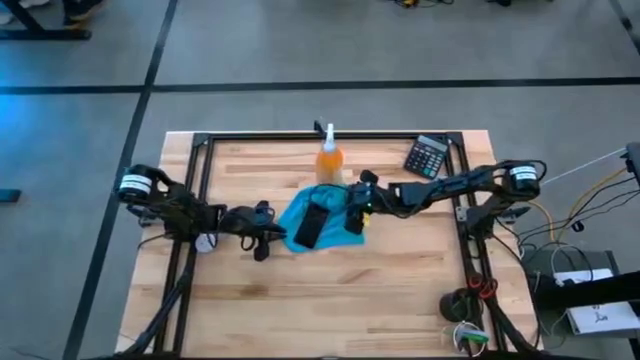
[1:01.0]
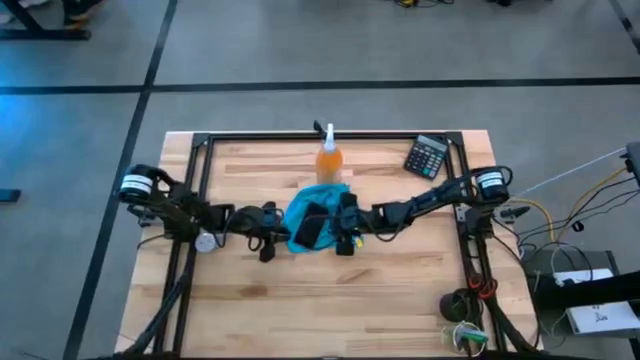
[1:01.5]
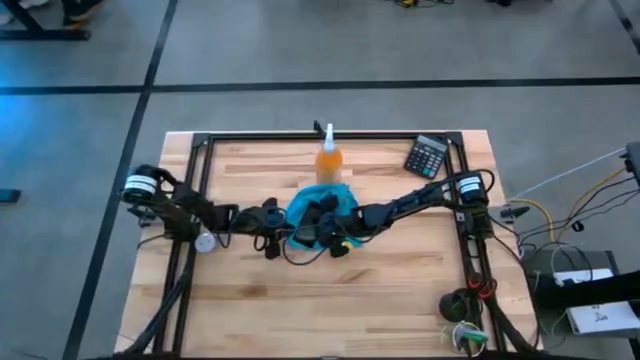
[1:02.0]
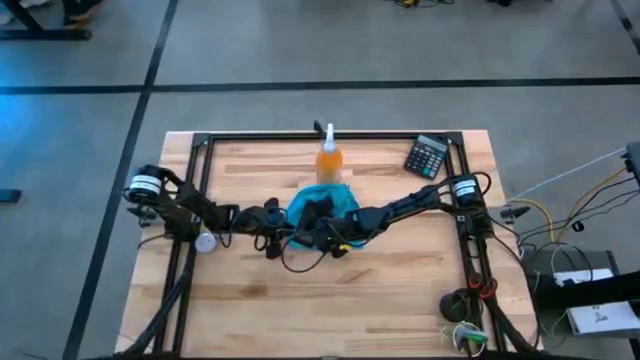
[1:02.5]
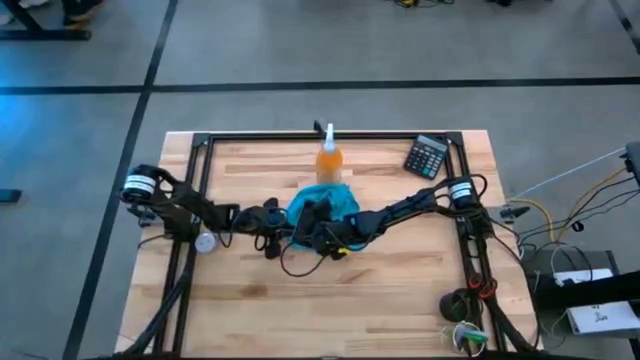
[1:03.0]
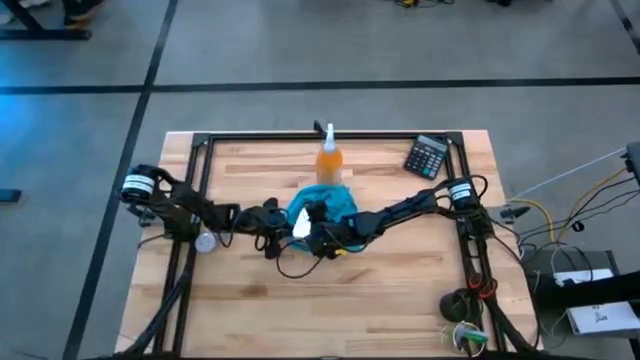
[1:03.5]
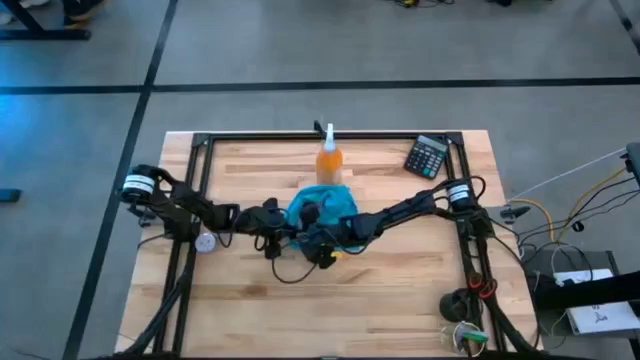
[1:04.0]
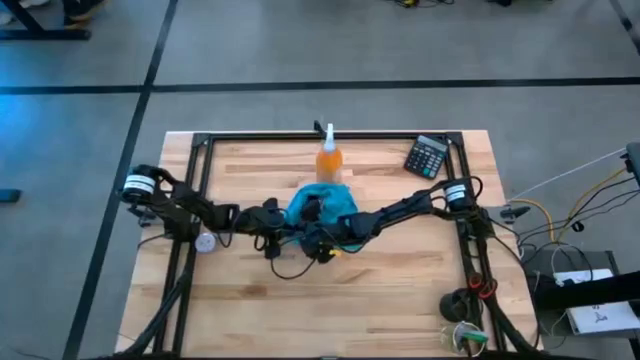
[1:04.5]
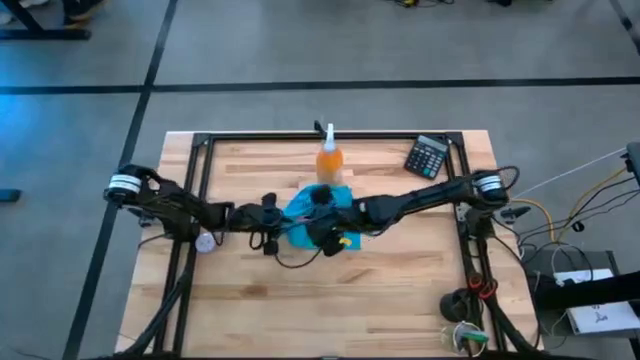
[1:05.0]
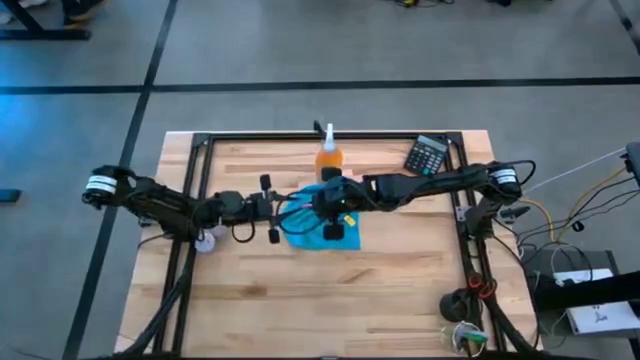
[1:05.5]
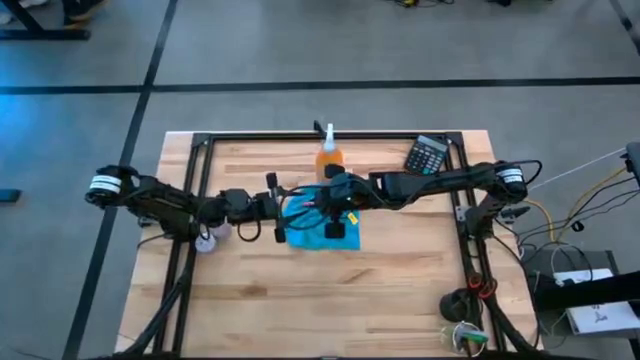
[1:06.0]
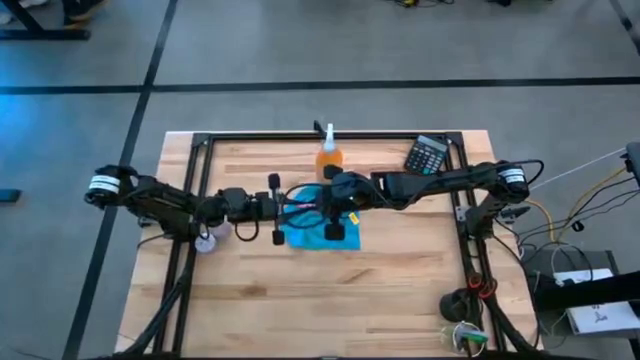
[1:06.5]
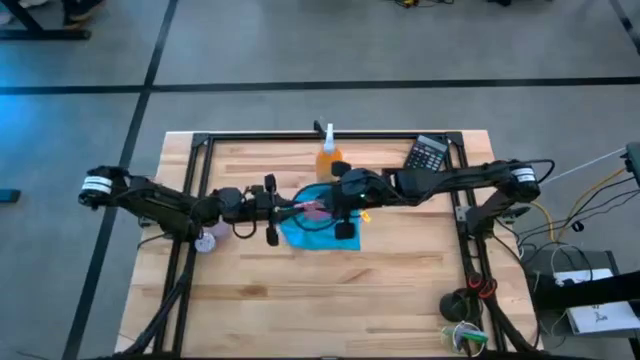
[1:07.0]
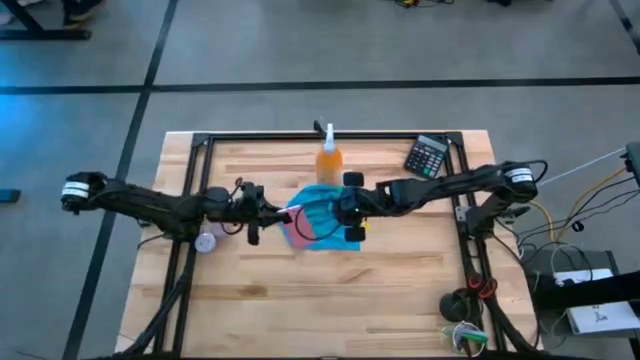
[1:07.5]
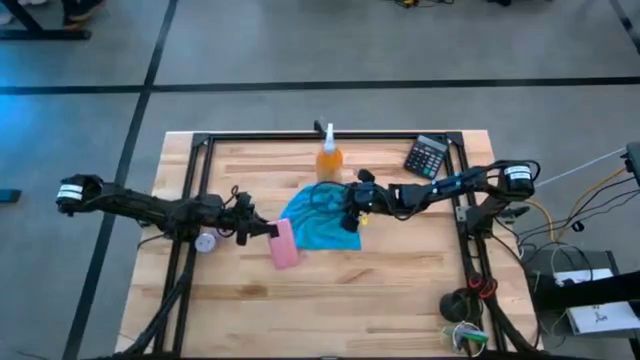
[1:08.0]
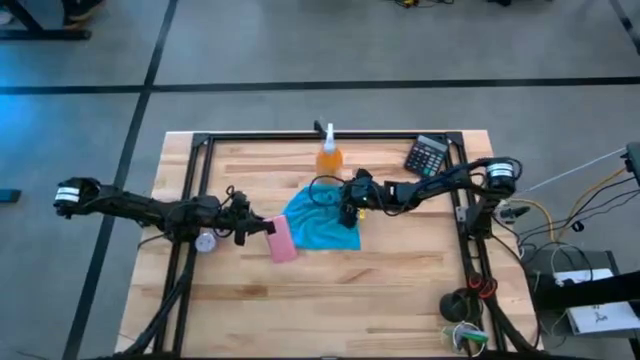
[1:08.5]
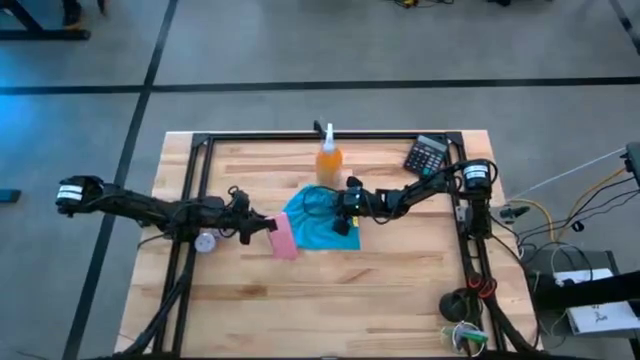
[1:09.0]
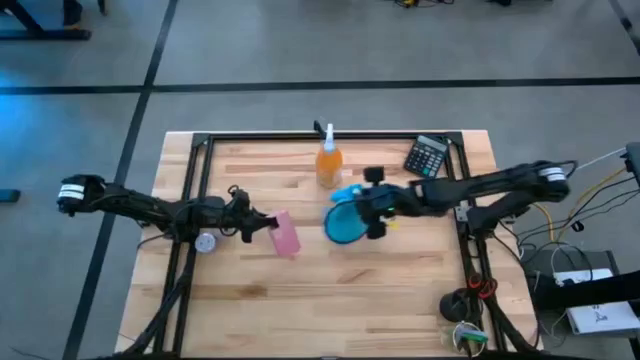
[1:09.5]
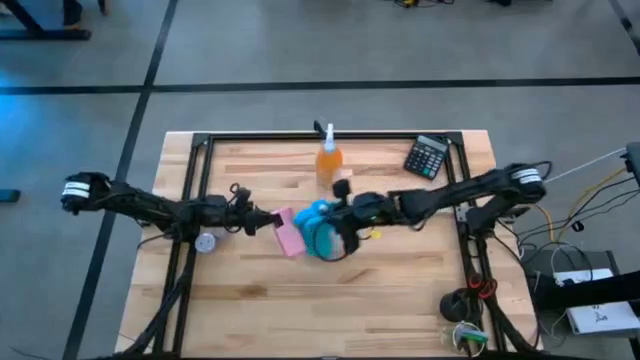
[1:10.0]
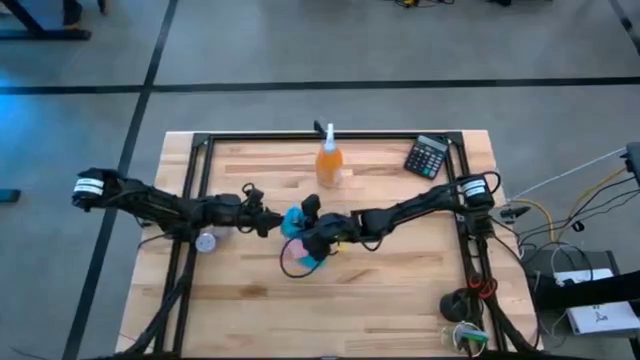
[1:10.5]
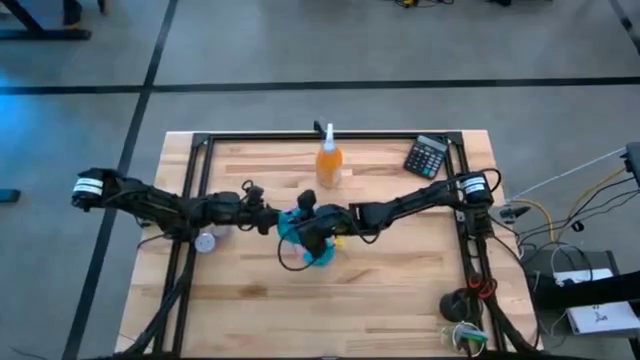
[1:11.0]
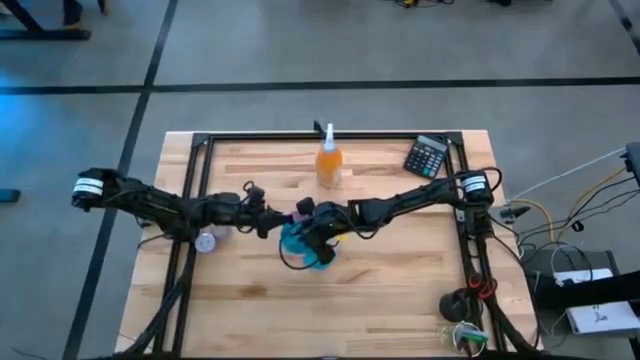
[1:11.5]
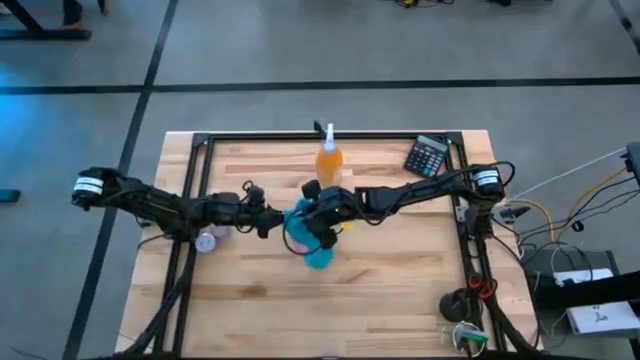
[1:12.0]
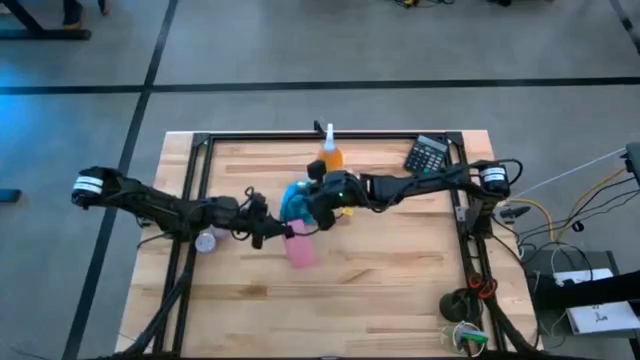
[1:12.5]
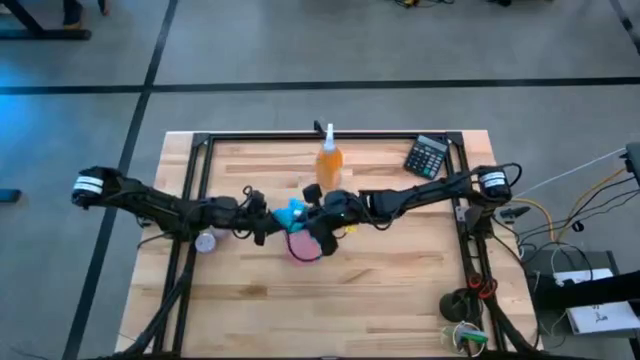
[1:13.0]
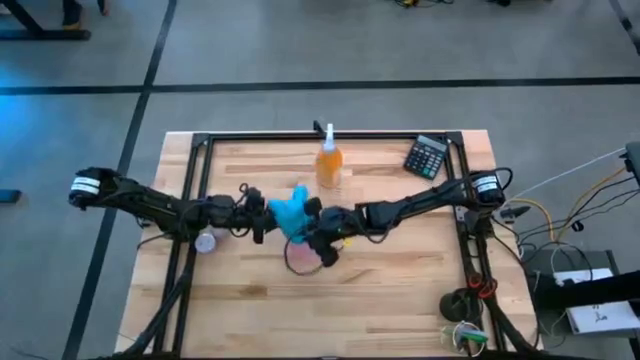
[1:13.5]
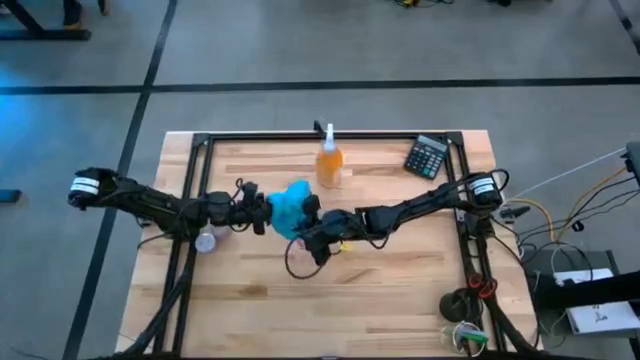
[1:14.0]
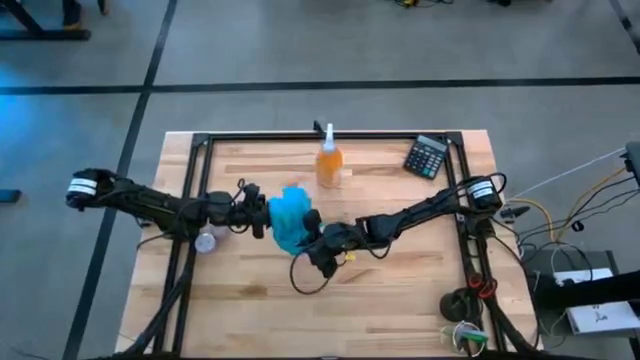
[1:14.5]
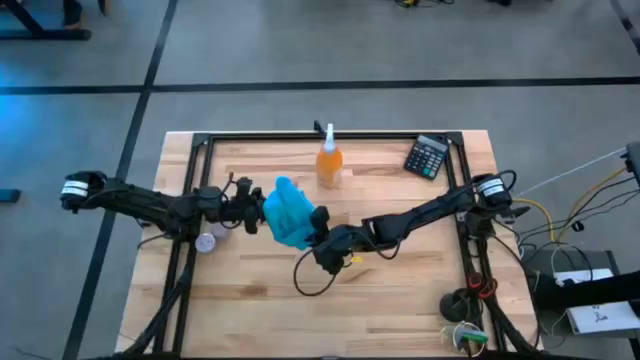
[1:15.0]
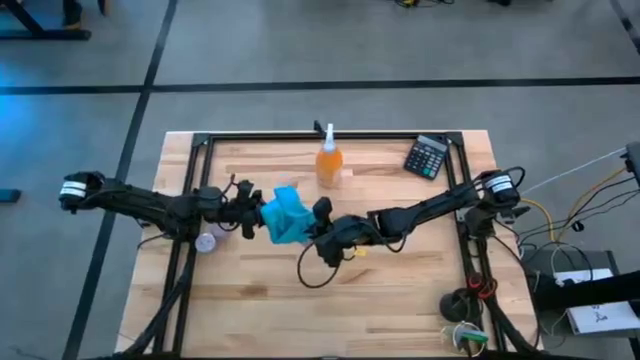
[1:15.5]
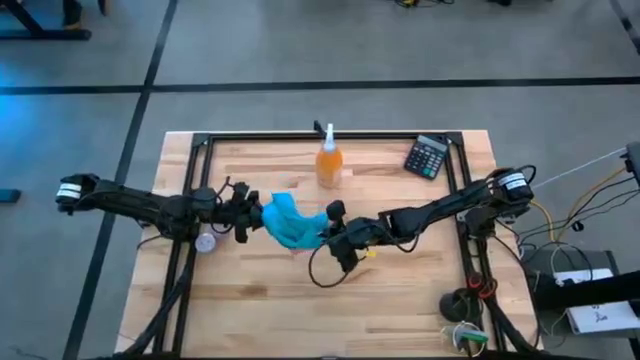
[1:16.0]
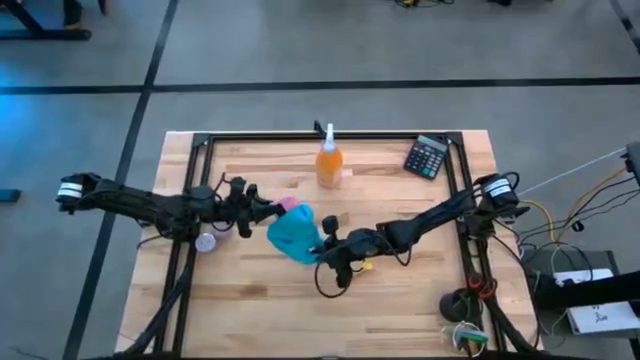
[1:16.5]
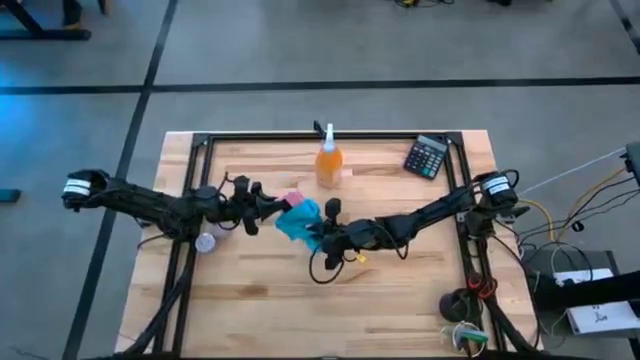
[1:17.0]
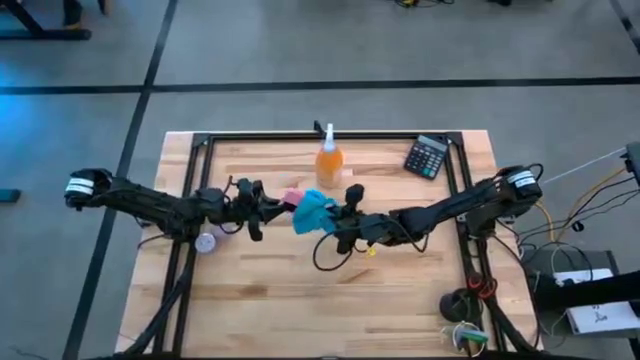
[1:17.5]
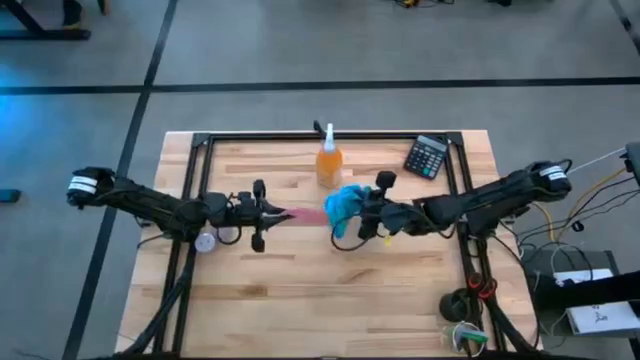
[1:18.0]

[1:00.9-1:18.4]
Task: Apply microfiber cloth
Wipe the back of the pink cellphone using microfiber cloth

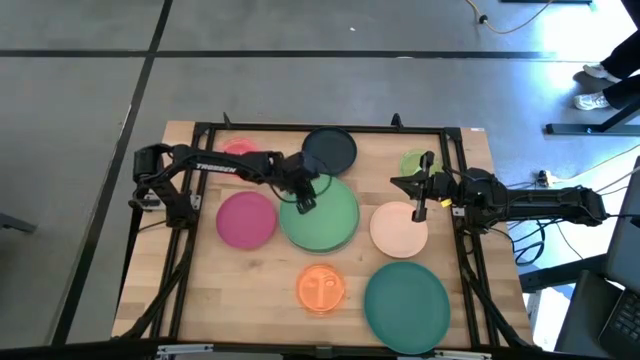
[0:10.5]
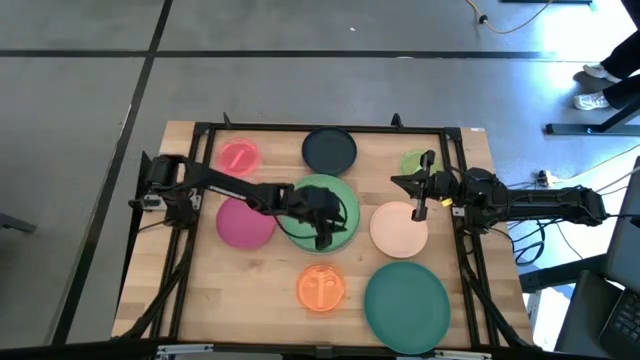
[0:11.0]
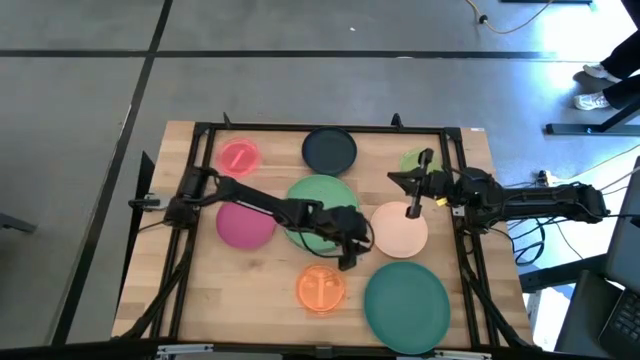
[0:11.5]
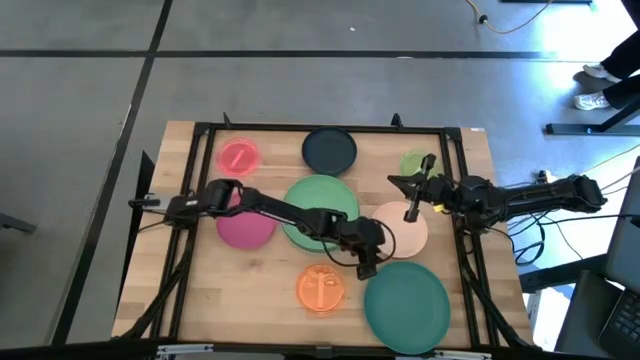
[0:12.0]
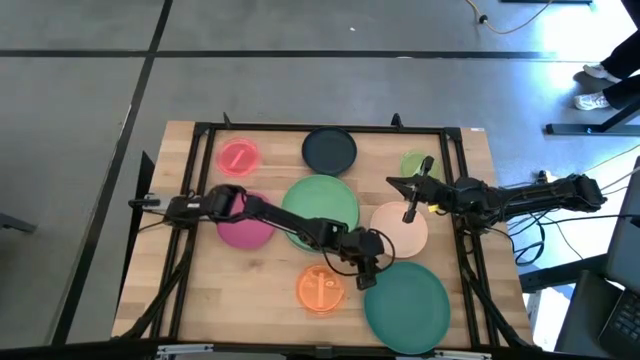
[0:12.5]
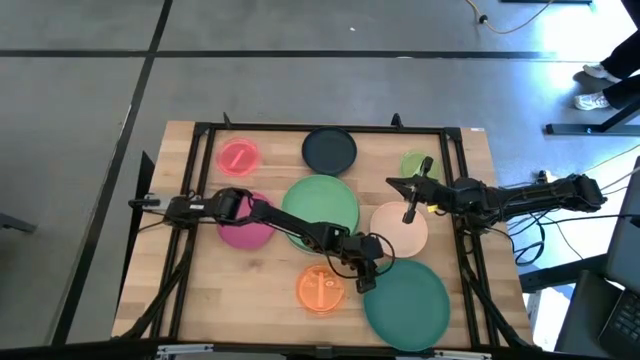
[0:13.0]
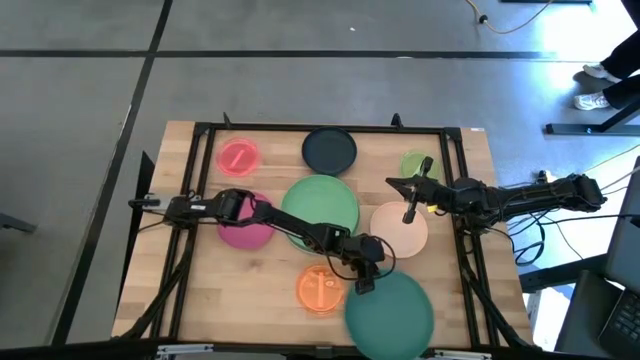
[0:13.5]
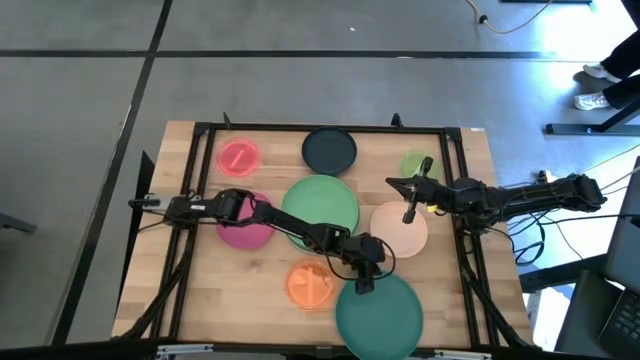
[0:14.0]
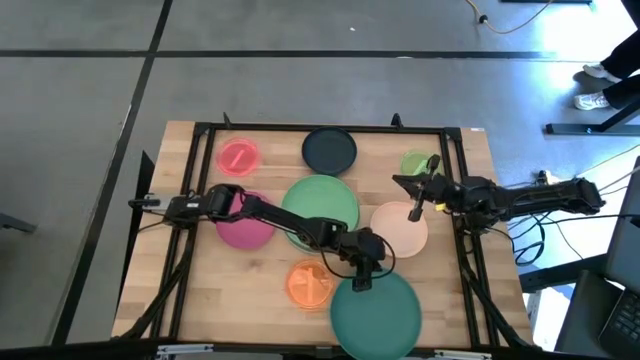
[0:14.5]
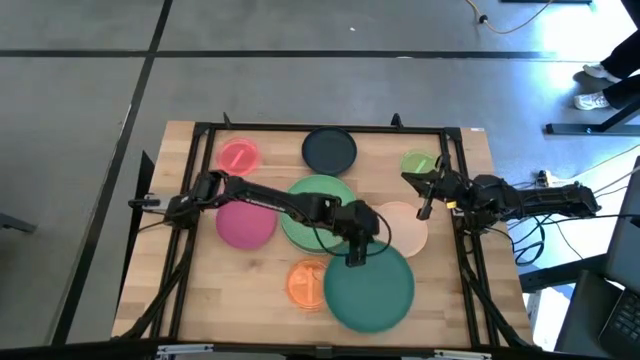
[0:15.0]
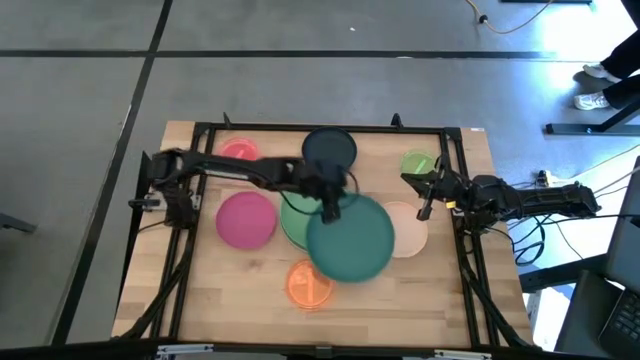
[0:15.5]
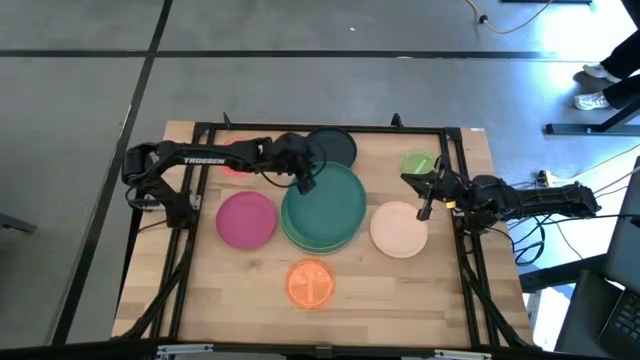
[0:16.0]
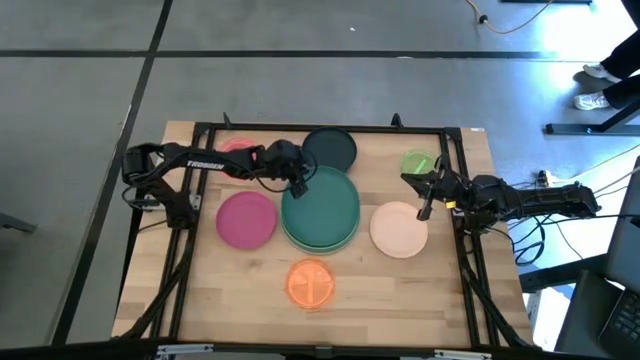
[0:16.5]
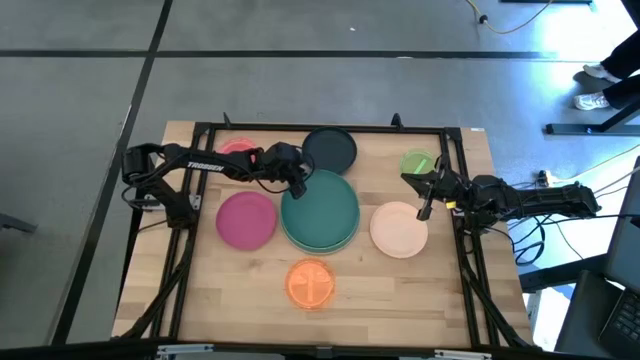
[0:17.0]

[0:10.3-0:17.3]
Task: Stack plastic plates
Stack the dark green plate on the light green plate
